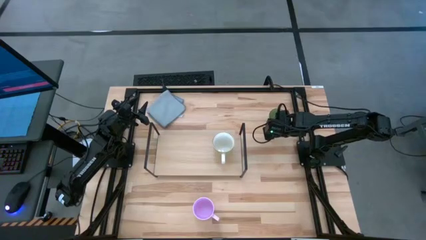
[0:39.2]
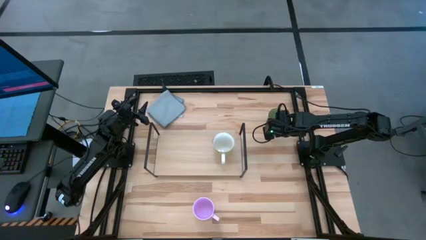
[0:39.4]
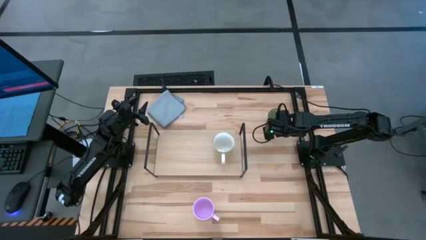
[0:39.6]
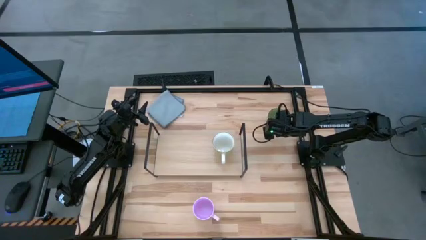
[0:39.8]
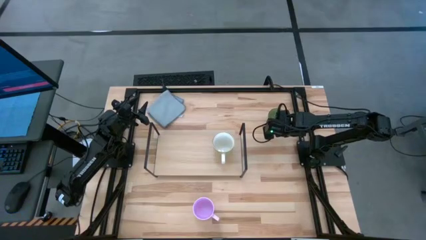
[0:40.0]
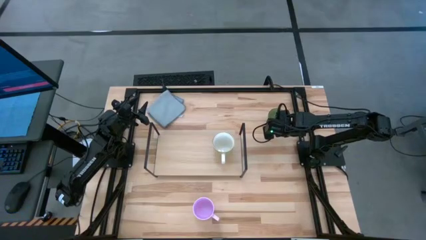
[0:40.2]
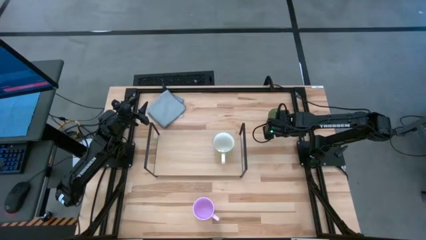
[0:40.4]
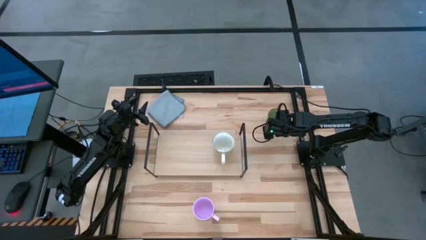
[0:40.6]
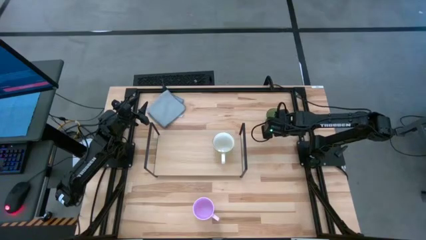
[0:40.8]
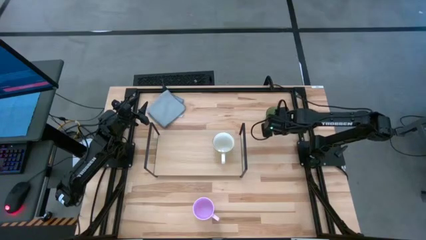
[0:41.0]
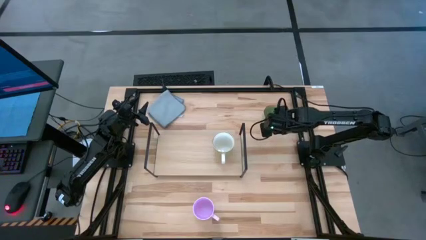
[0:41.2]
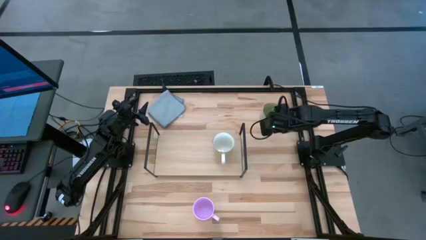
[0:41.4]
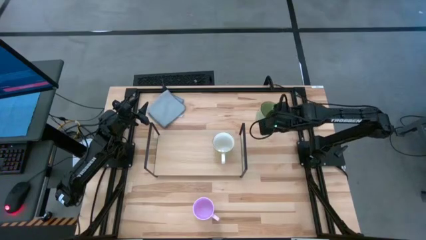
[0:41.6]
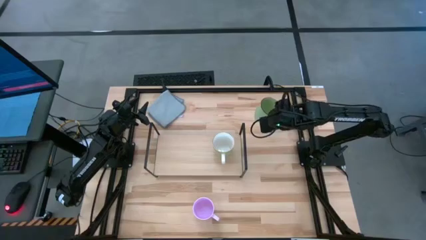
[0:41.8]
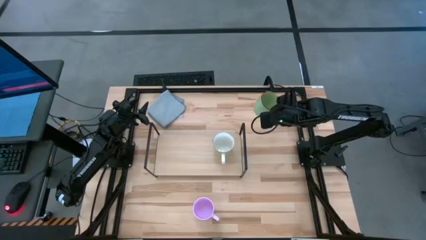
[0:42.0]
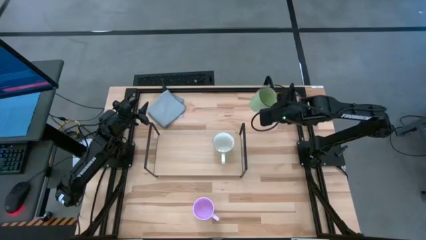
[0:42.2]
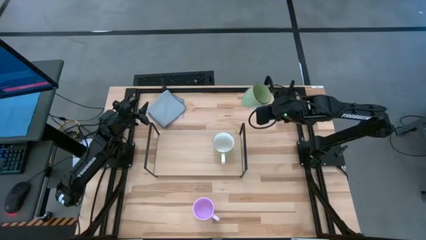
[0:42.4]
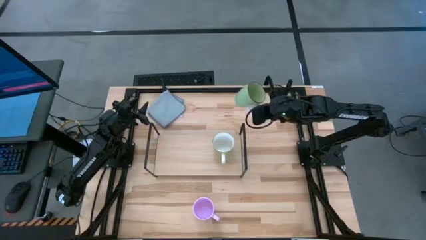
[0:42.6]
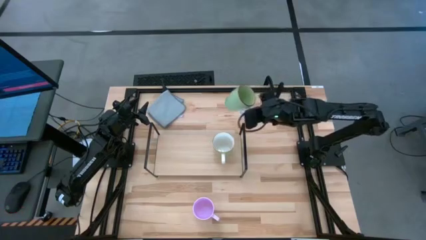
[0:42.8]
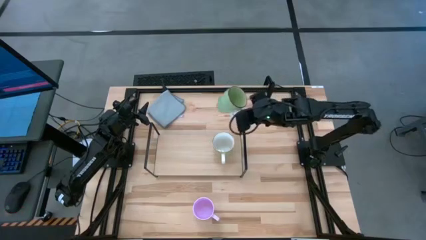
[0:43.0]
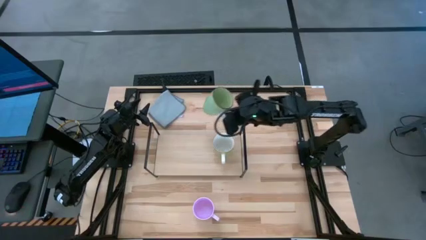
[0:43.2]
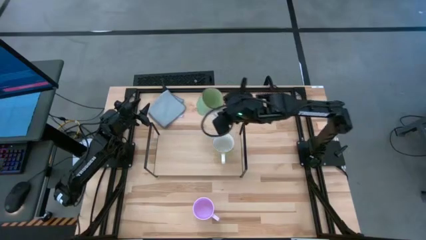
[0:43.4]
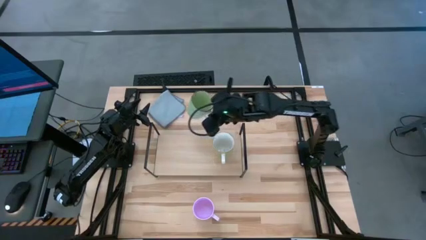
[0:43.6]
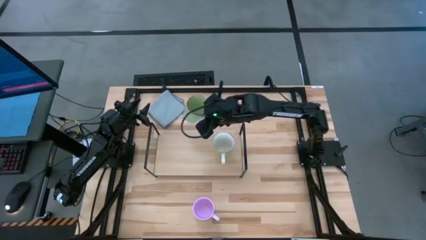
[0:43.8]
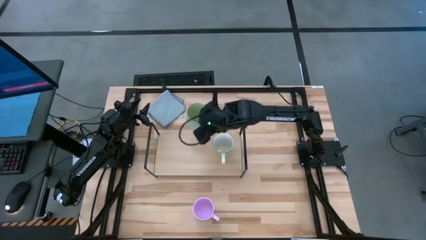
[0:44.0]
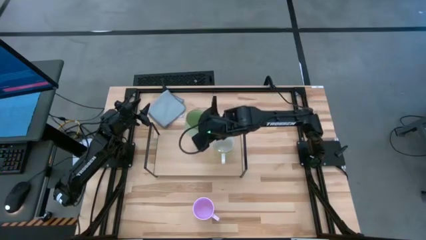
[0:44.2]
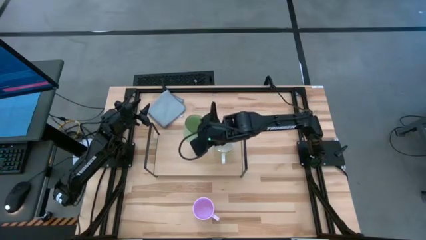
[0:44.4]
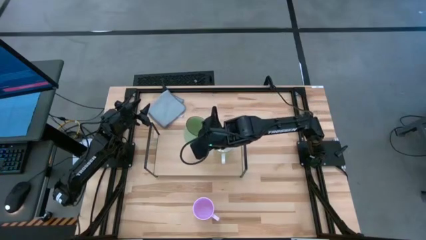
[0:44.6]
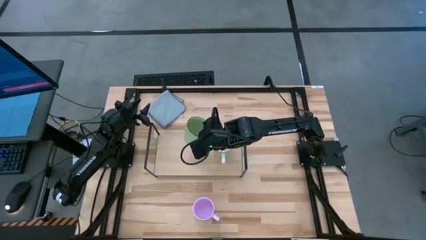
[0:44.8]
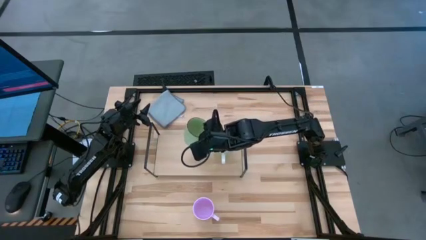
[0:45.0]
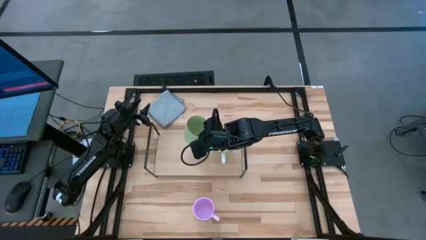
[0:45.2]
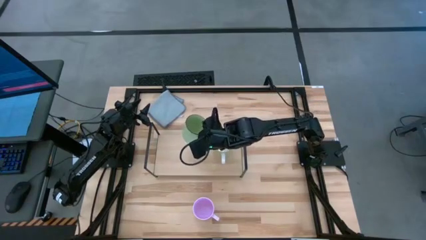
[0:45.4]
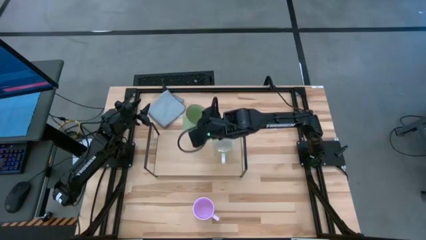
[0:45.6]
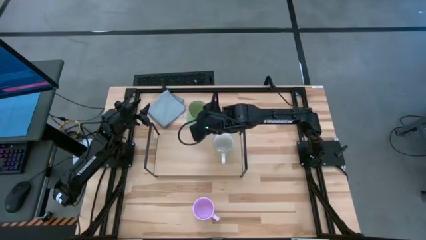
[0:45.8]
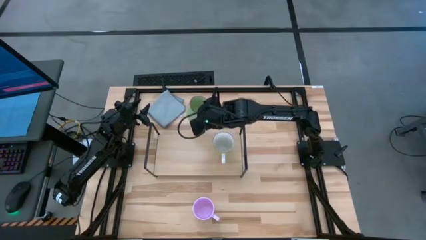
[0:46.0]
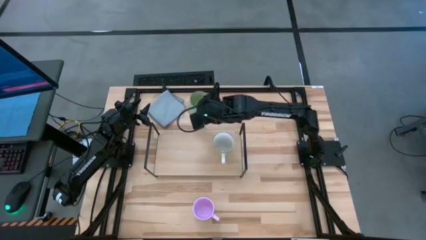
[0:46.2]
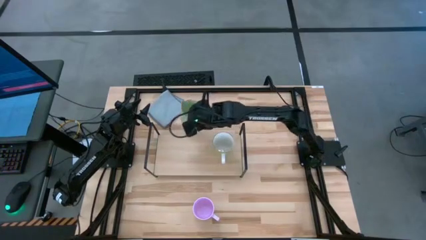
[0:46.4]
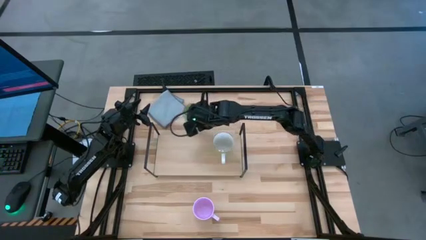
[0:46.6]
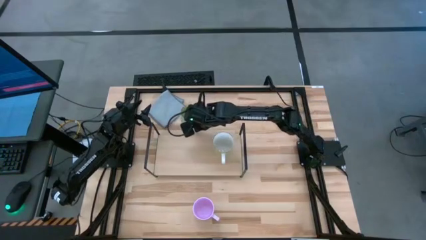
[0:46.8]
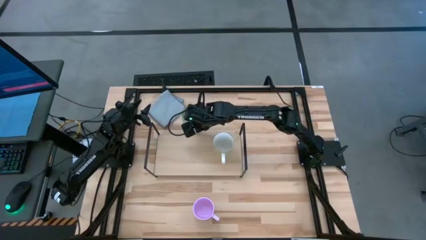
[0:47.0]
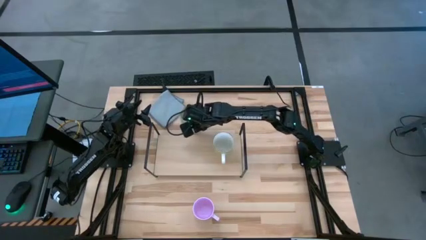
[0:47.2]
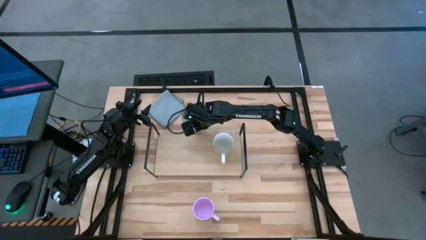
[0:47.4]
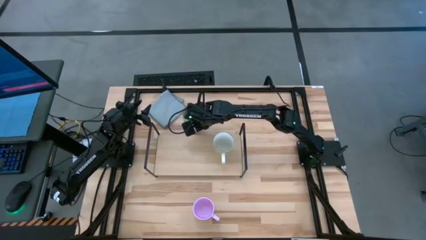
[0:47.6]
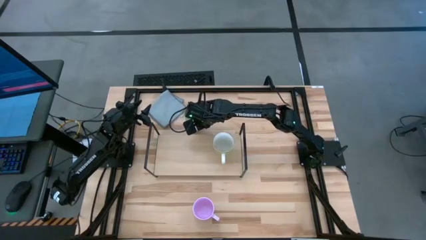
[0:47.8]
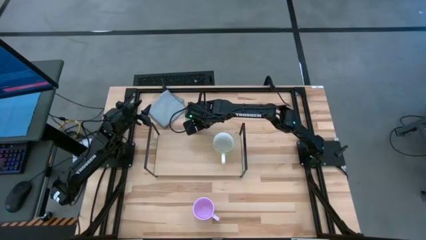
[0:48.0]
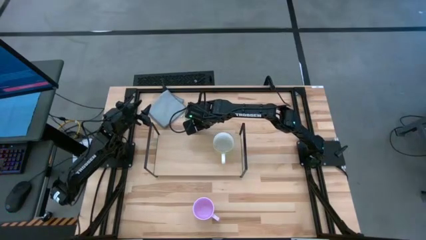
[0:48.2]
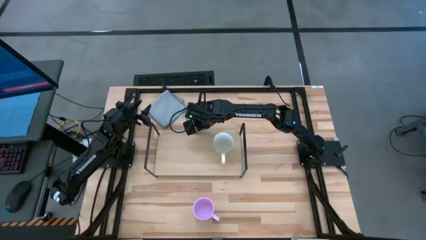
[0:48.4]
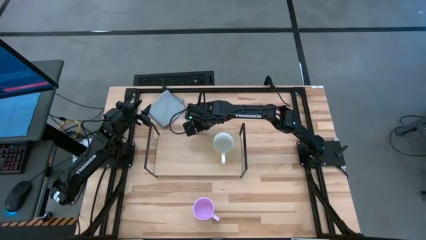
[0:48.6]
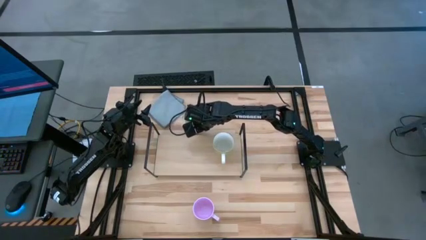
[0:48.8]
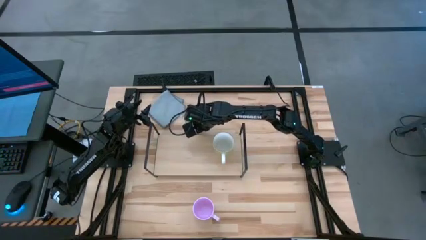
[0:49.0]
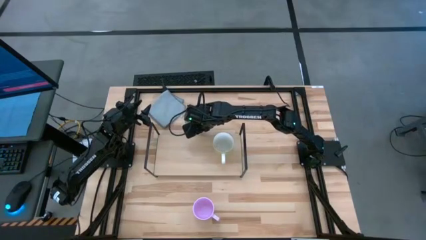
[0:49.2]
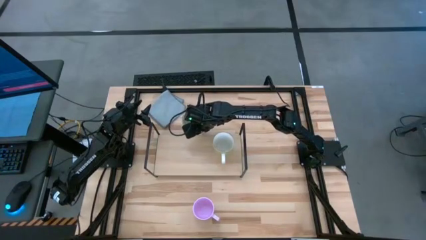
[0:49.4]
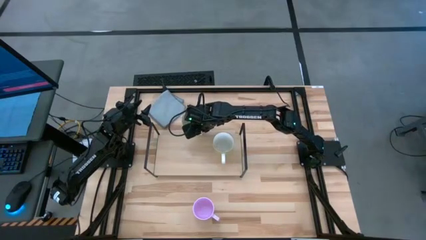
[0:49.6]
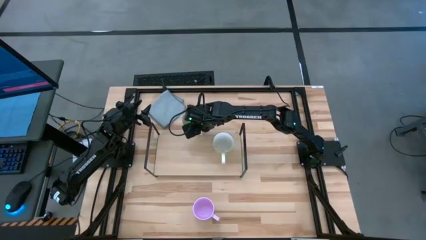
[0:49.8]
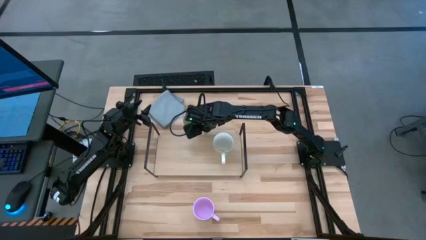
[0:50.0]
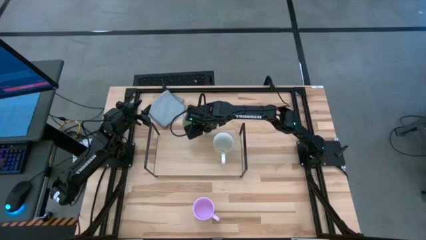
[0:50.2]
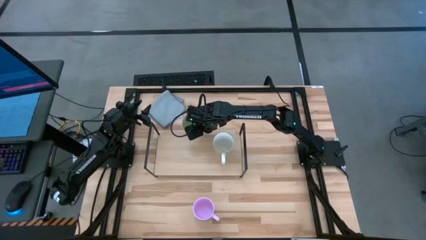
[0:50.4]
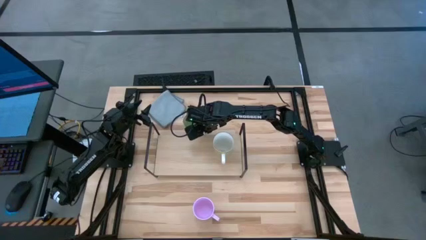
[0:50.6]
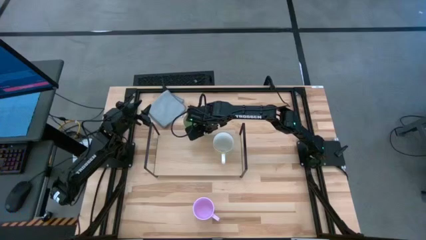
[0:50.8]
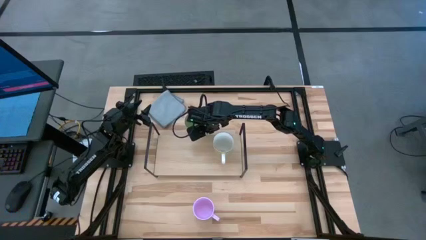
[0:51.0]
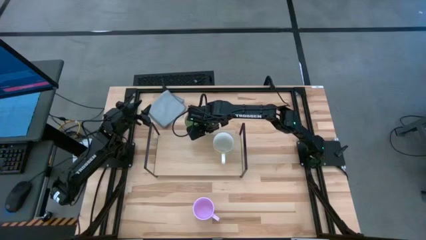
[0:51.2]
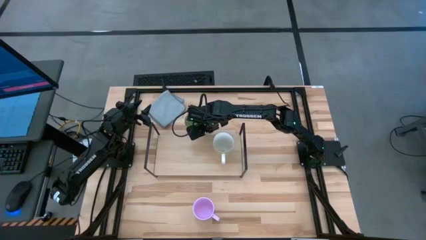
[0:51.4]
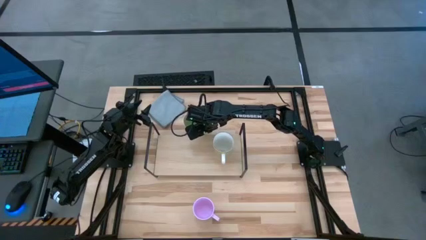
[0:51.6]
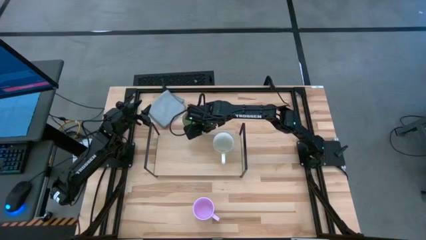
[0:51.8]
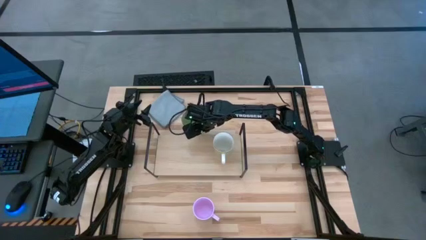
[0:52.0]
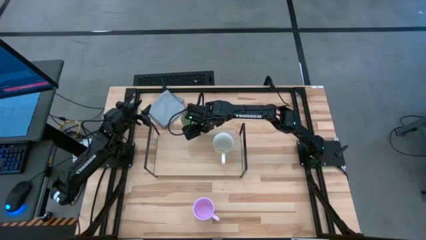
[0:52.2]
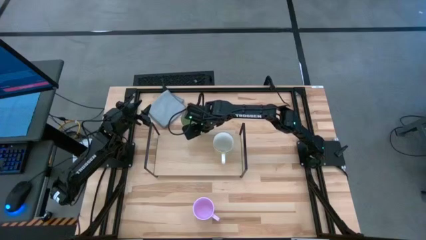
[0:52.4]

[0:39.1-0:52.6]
Task: Stack small to large cups/mugs on shelf
Put the green mug on the shelf
